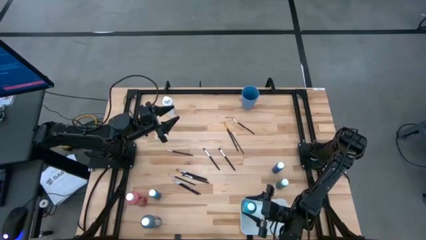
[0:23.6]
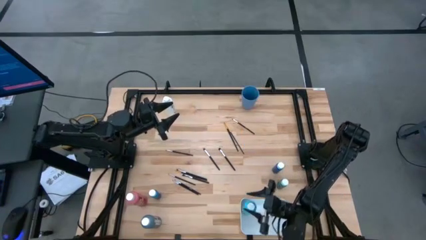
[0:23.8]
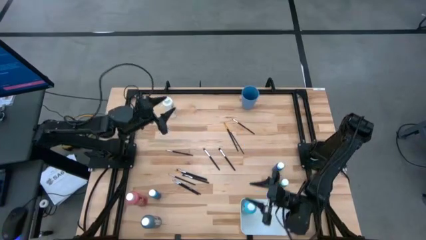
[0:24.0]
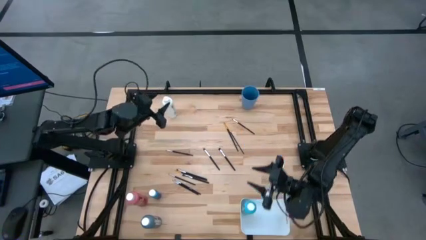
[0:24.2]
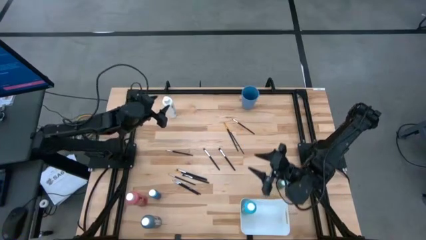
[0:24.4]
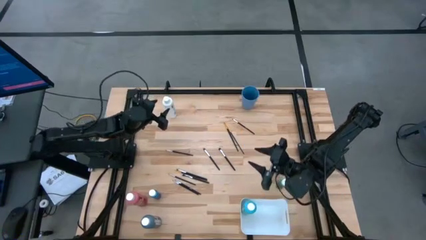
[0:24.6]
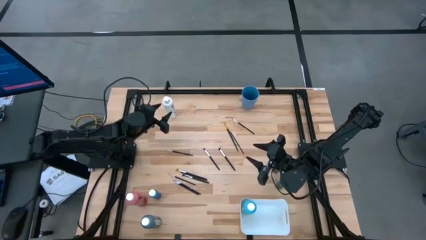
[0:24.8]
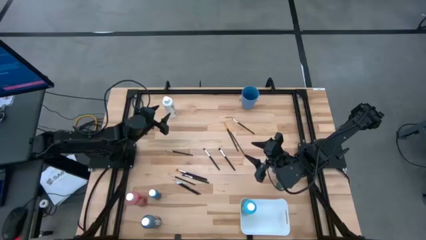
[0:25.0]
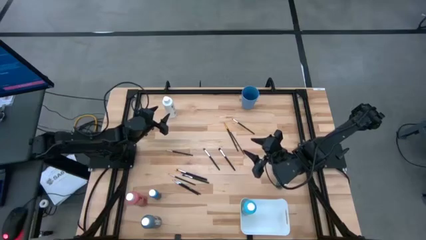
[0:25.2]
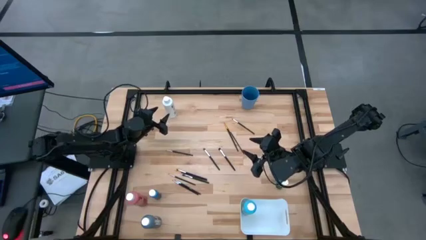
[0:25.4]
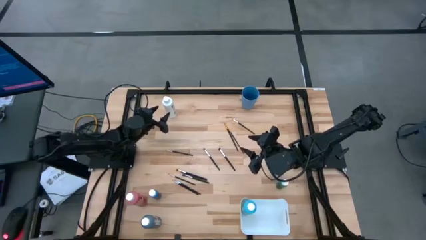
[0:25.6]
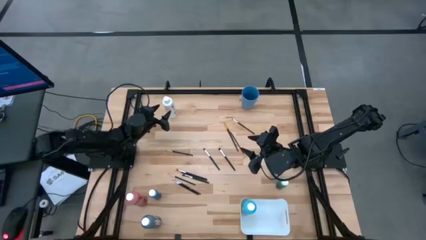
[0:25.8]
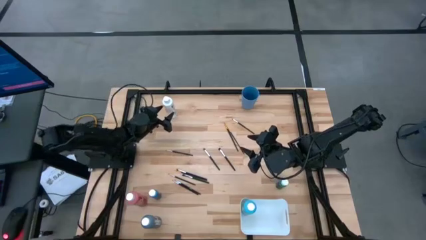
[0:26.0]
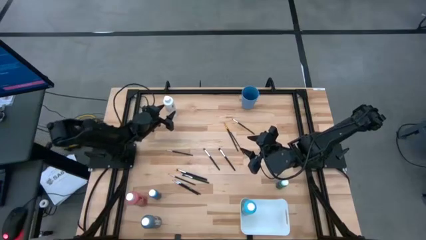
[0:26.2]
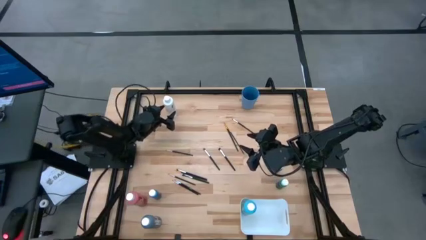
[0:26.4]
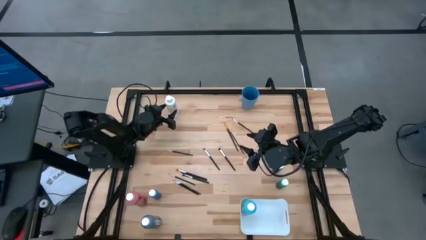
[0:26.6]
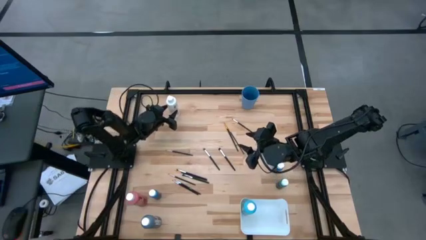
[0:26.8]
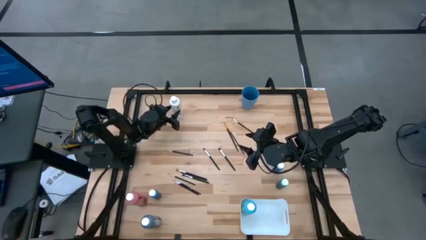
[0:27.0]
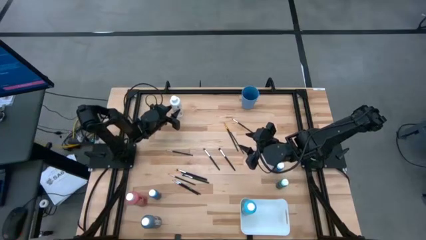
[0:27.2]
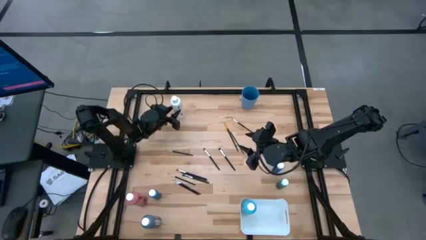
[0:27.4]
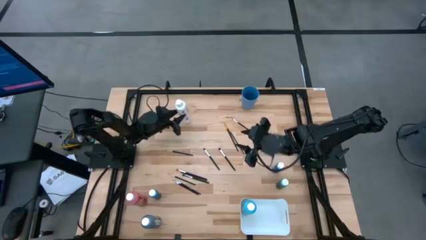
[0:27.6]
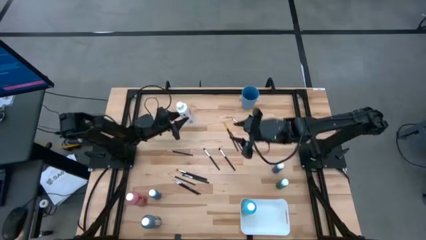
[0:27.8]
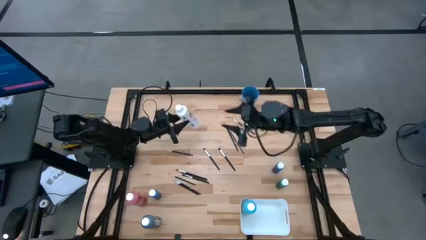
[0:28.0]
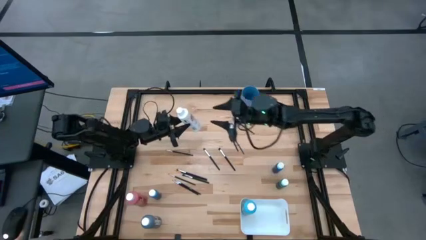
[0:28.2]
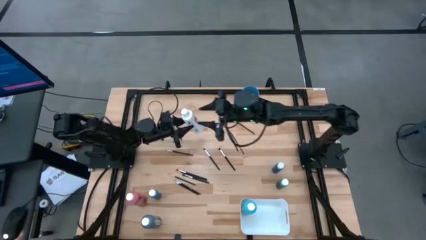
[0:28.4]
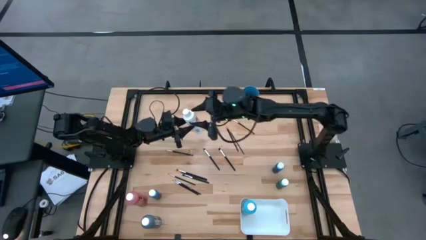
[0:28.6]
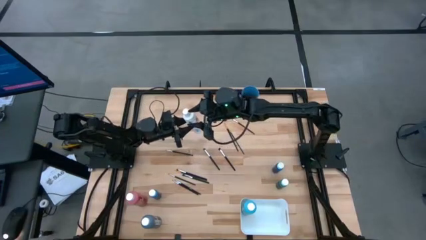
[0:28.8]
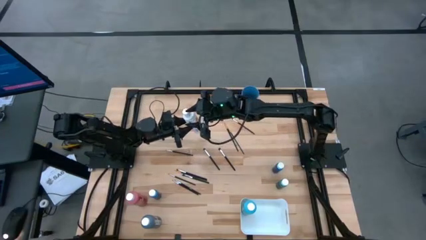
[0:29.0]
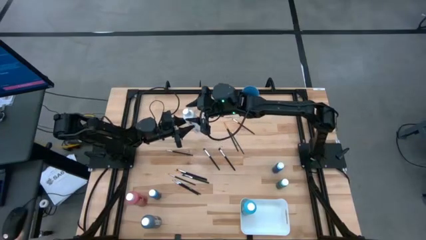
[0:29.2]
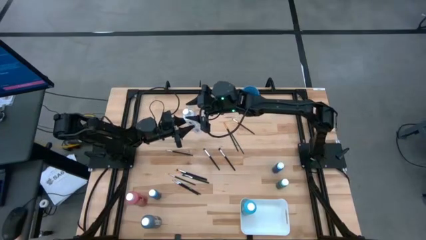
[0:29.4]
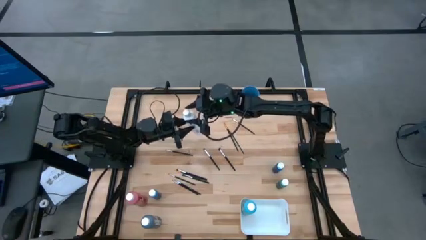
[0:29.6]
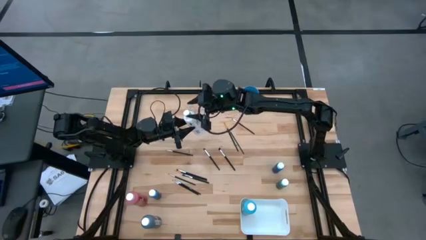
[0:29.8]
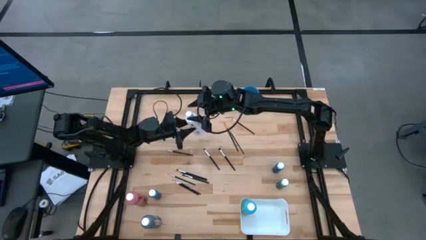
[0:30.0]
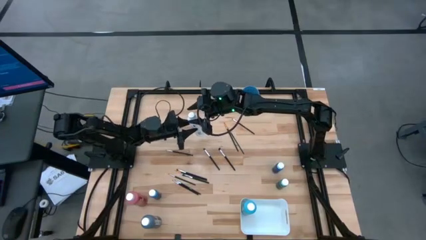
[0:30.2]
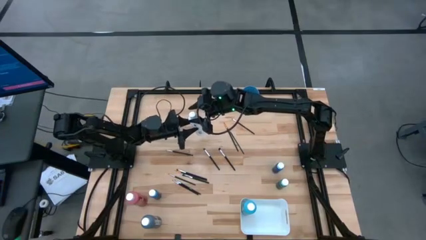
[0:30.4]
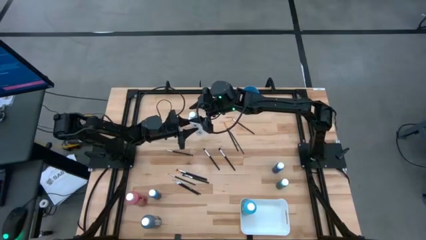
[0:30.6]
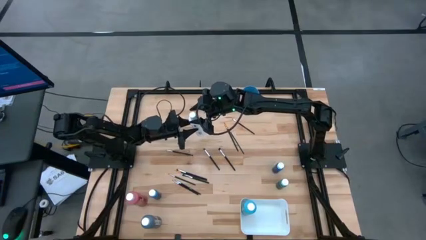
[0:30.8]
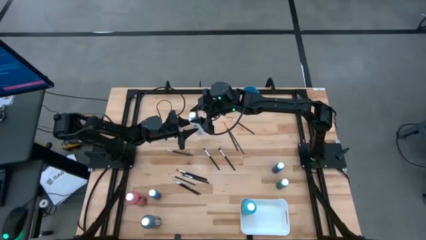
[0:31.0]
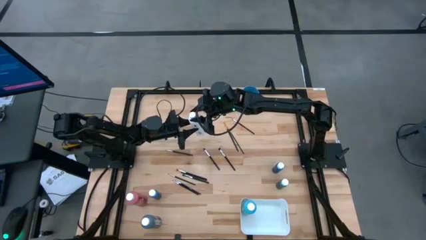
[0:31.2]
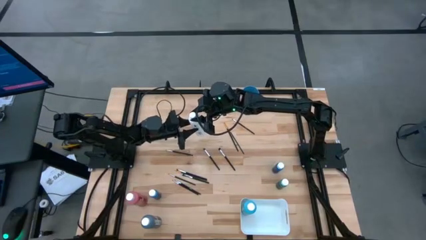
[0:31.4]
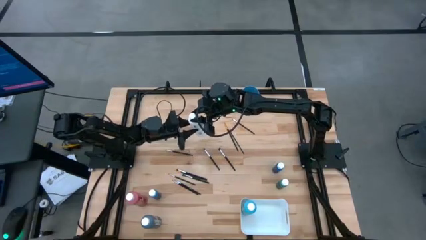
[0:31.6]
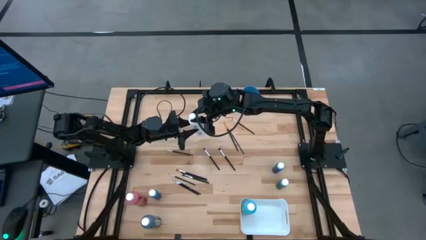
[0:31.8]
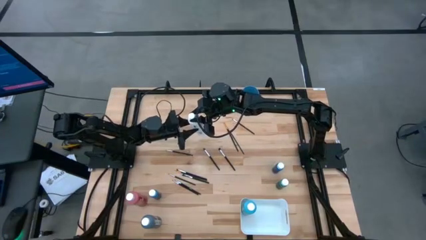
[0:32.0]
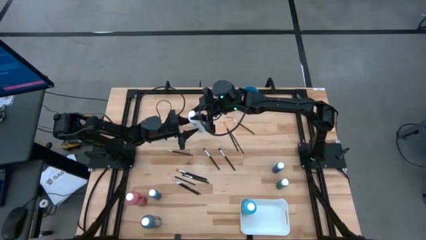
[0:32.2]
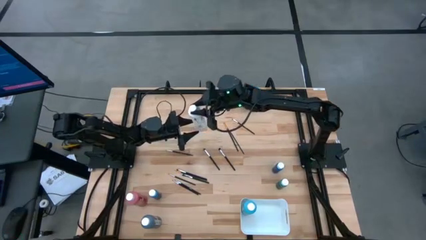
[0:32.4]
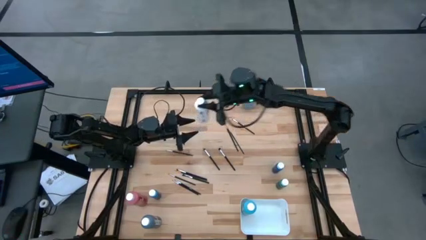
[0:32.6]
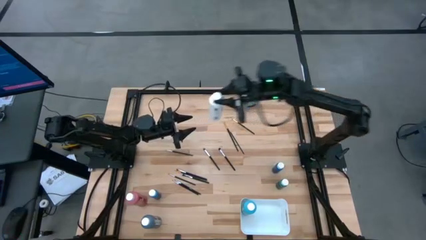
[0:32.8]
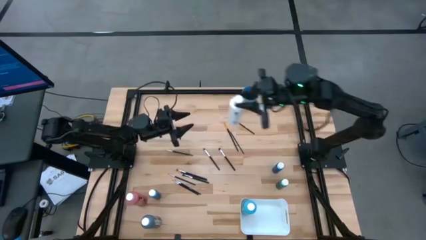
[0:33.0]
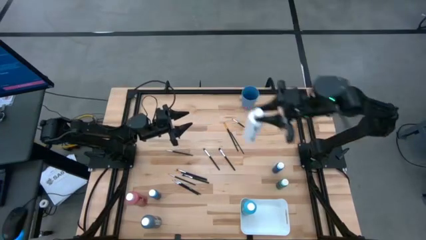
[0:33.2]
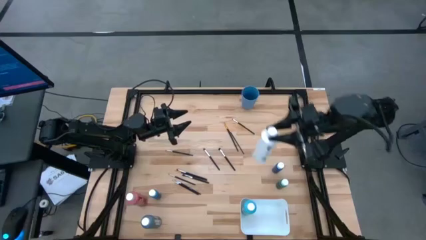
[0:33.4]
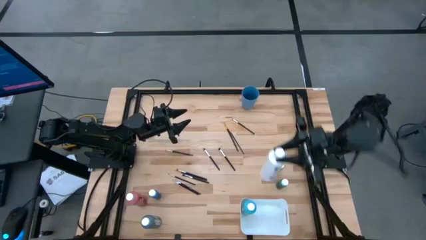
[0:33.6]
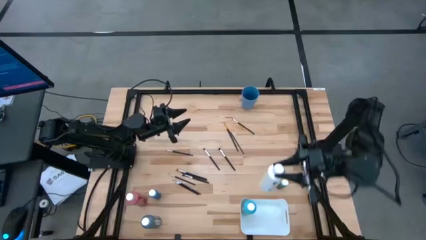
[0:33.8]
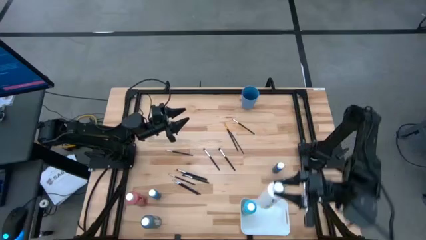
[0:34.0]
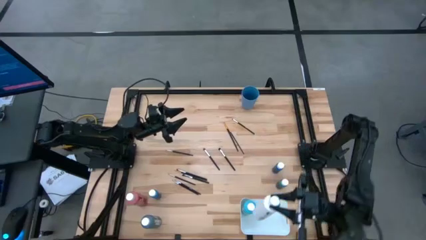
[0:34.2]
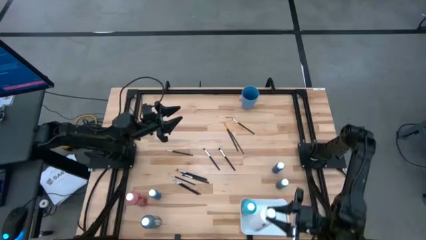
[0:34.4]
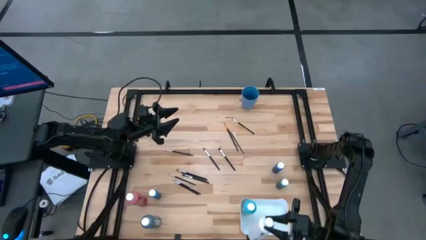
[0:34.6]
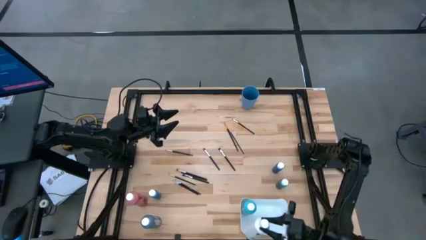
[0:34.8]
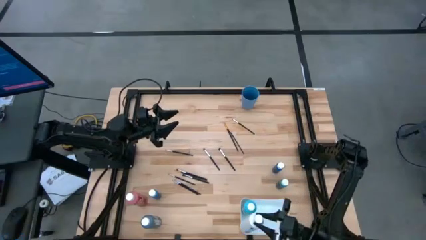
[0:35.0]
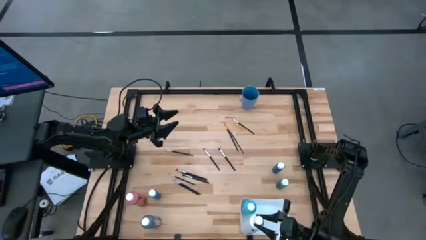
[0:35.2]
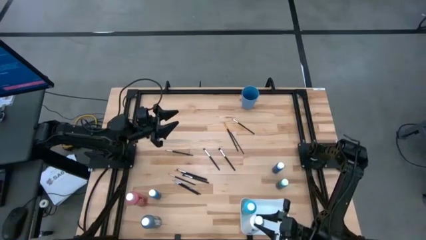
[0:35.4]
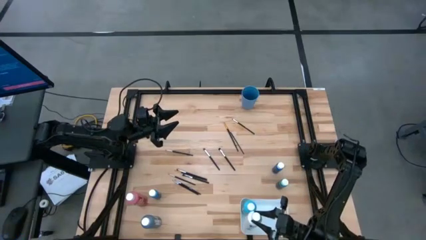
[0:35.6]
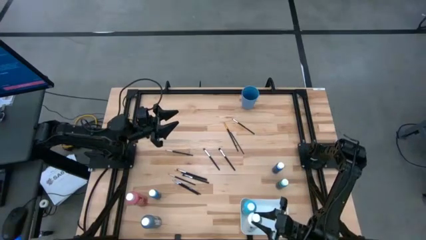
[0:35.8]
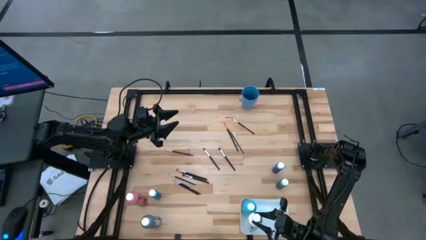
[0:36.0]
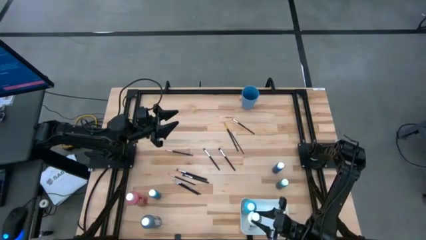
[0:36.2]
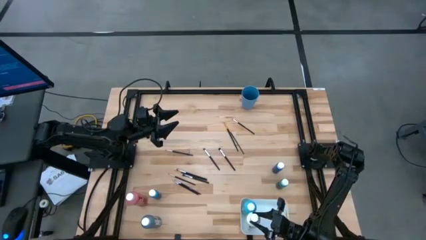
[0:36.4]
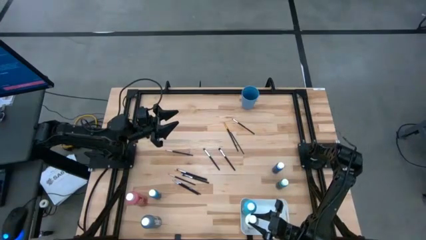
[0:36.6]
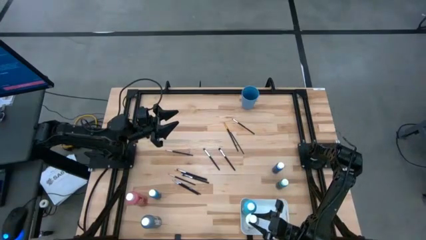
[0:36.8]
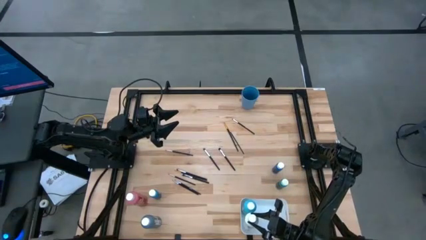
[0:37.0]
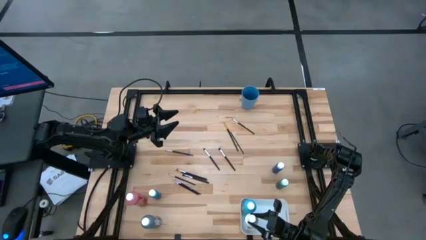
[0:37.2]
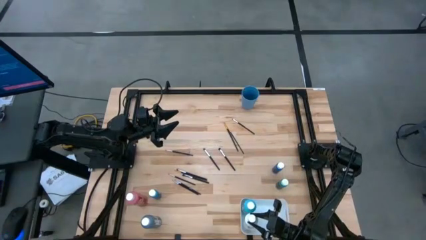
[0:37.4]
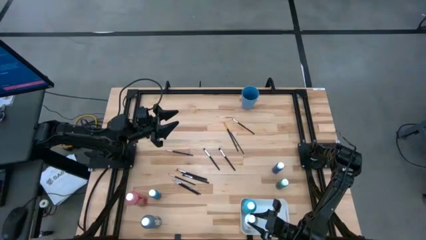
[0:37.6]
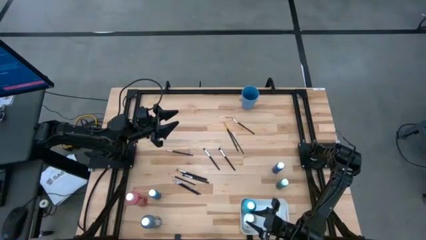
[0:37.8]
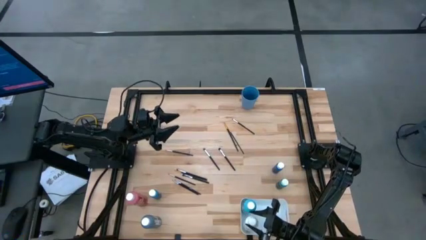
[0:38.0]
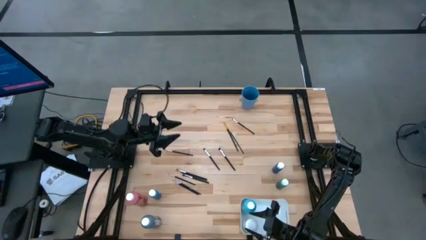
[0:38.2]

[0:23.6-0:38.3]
Task: Pick & Place Paint Supplies
Put the large white paint bottle into the white bin
